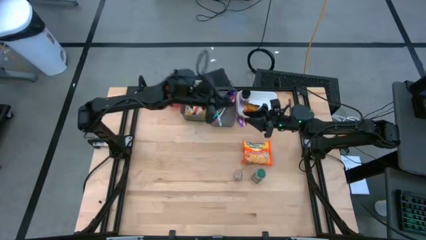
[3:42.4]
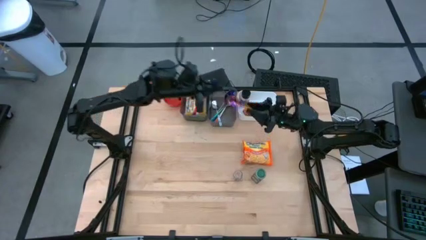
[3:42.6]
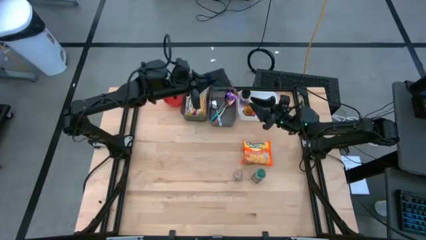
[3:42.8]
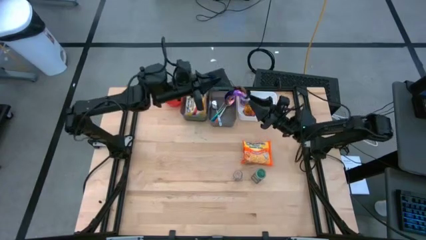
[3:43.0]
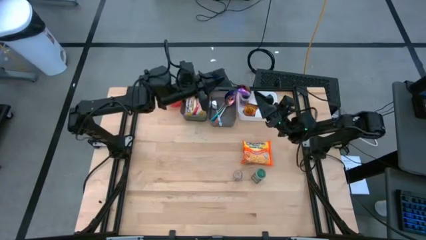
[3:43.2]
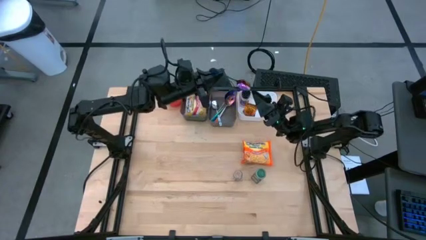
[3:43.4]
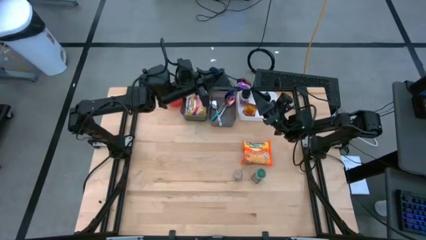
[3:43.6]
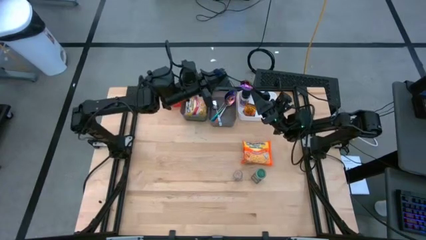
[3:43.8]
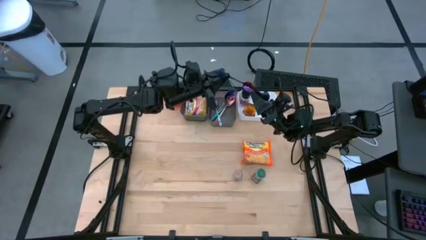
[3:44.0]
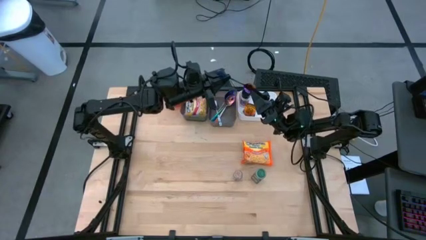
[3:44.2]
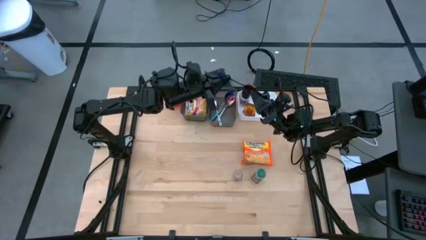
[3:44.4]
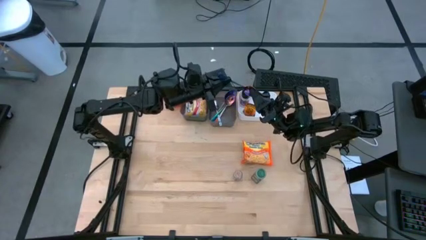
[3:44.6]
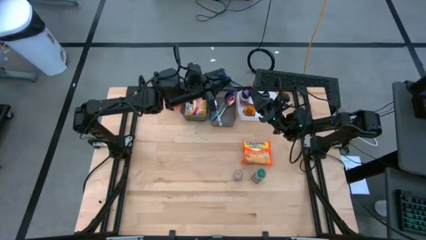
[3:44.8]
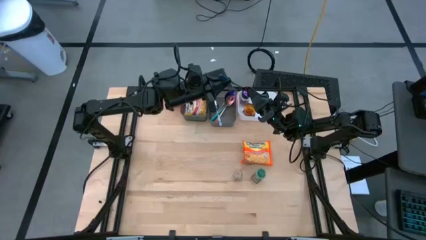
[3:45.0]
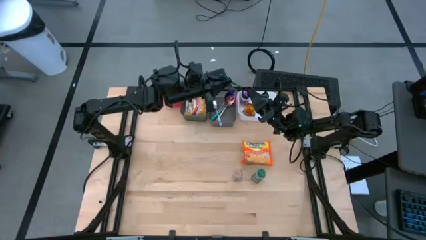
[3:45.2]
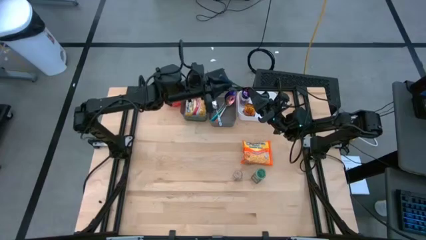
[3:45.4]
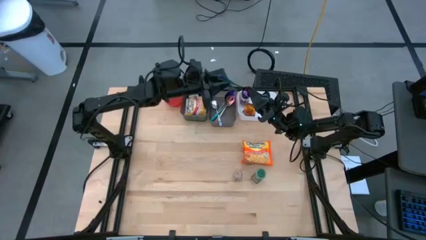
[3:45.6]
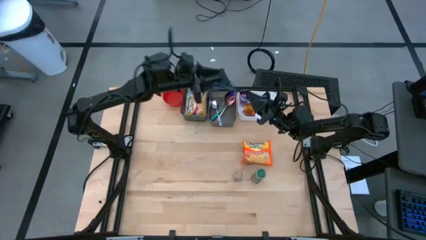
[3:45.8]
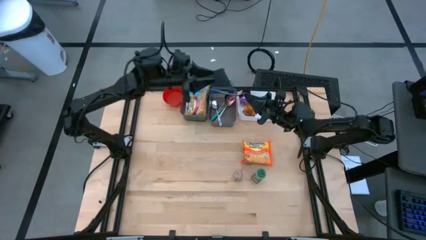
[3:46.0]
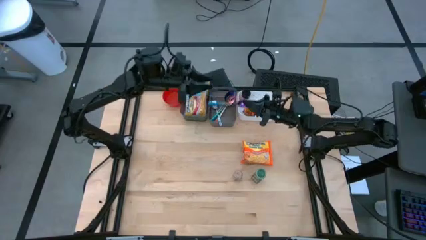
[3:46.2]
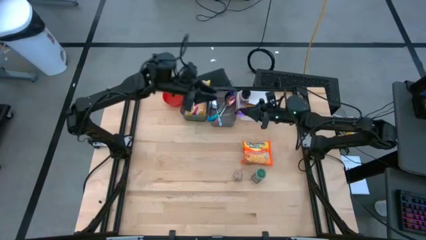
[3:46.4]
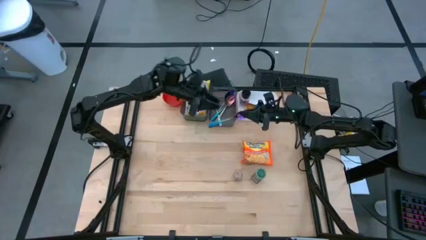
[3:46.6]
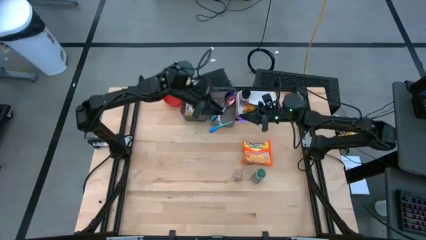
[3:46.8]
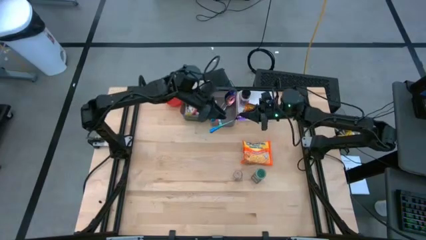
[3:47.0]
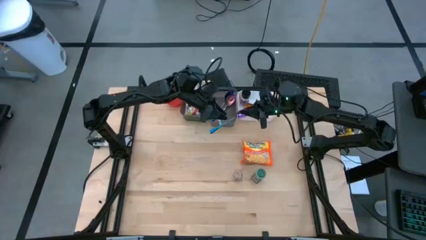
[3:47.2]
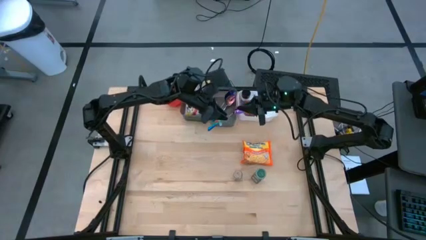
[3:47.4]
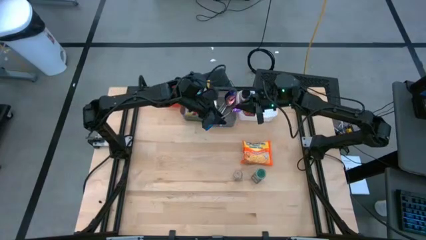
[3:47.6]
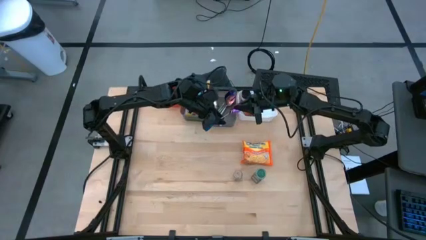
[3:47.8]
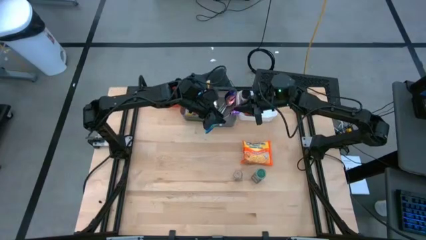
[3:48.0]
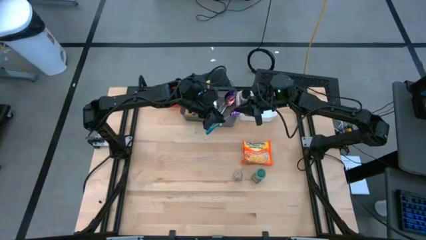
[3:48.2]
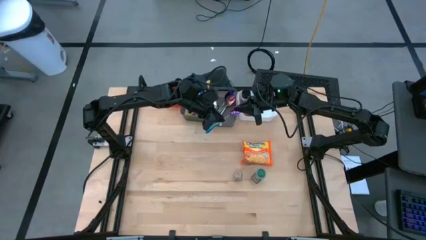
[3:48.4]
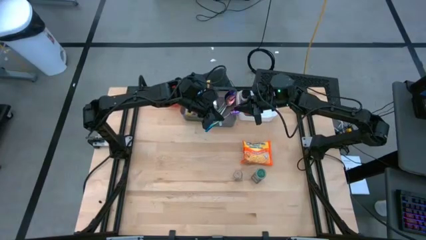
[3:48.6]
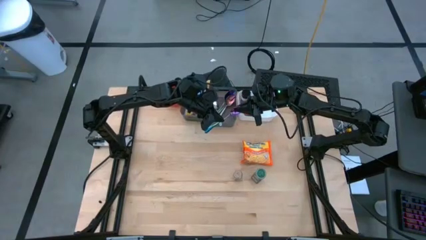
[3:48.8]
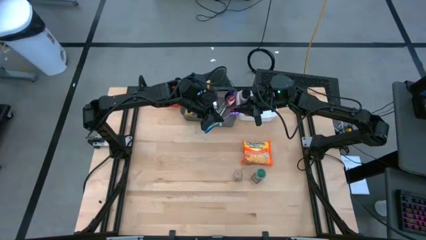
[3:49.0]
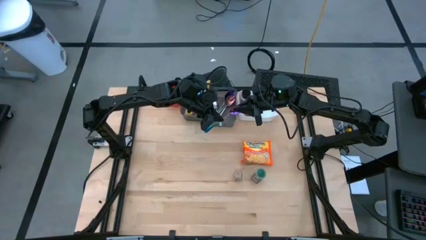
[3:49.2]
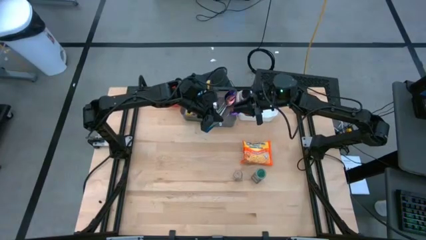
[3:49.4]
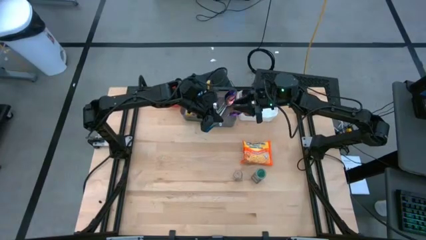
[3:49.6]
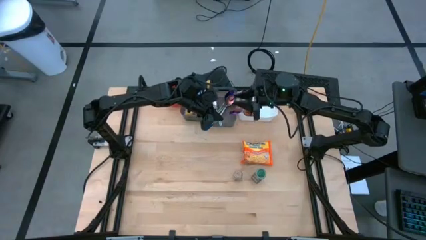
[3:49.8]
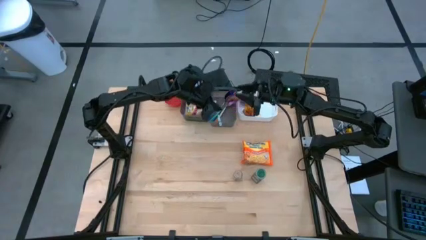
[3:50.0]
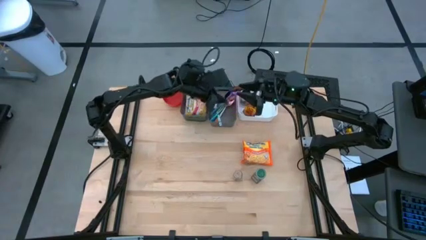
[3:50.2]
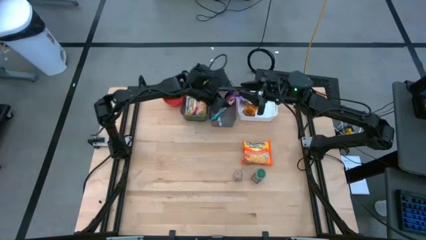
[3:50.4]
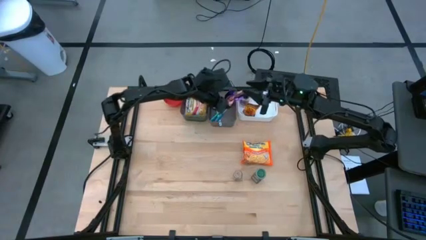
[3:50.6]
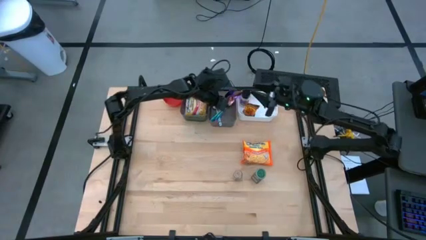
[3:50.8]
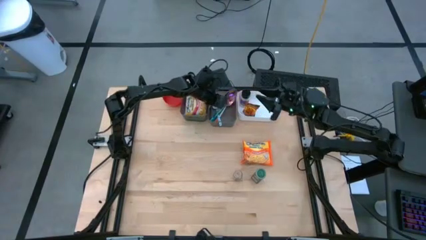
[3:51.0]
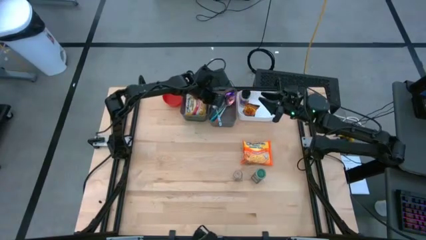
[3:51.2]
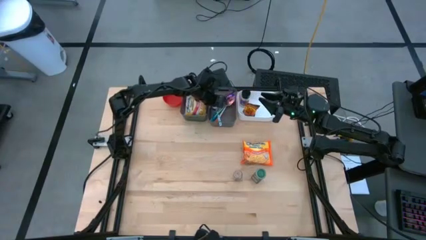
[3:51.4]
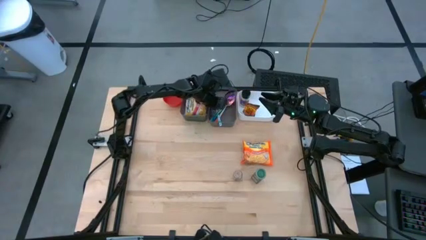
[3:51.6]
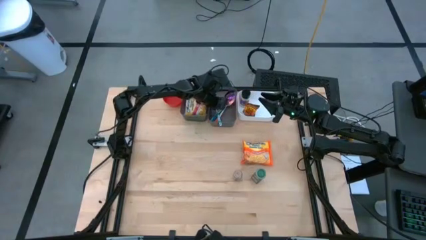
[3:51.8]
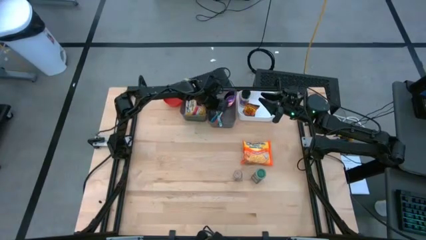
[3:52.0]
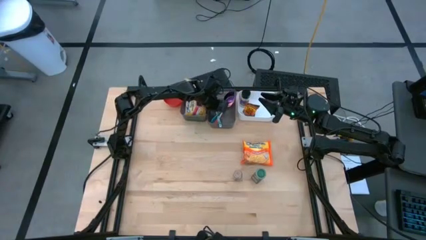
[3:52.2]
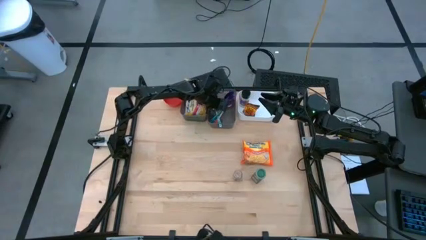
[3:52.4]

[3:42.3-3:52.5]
Task: Pick & Place Food Item
Put the violet spoon into the right black bin

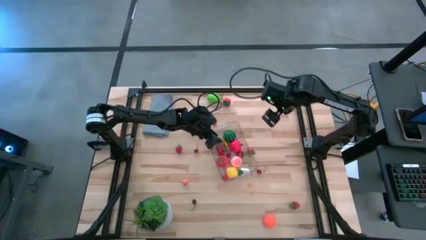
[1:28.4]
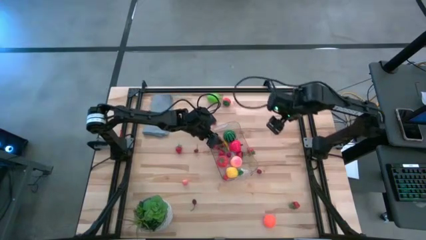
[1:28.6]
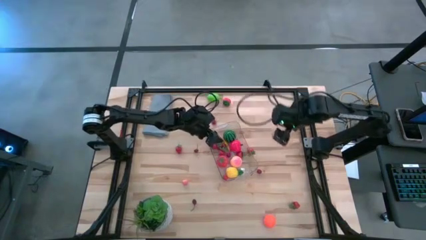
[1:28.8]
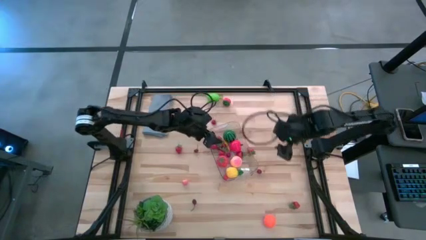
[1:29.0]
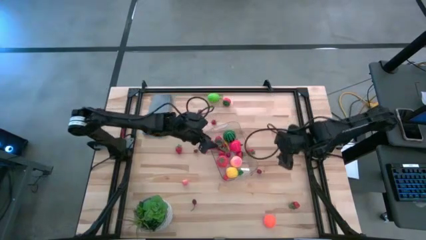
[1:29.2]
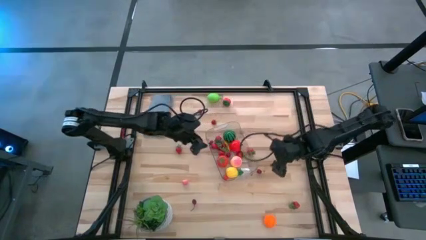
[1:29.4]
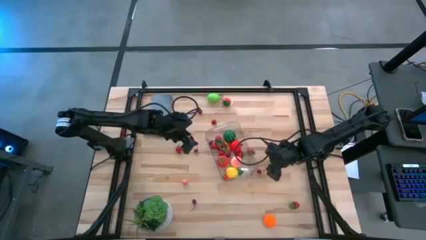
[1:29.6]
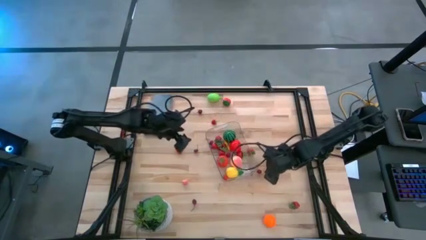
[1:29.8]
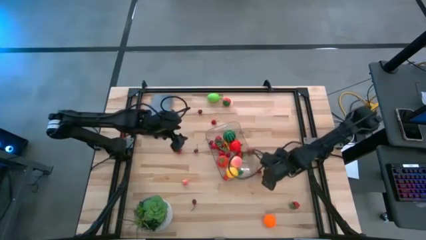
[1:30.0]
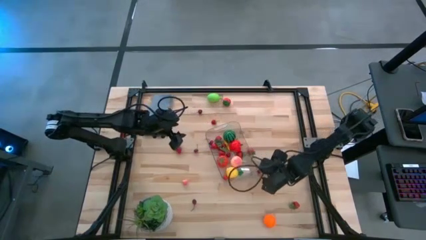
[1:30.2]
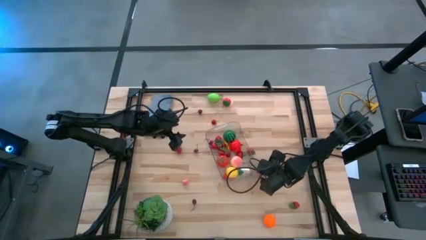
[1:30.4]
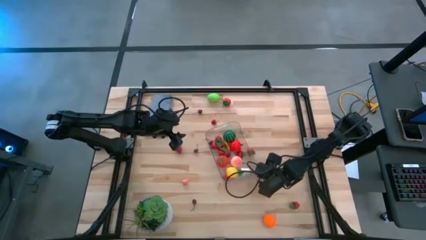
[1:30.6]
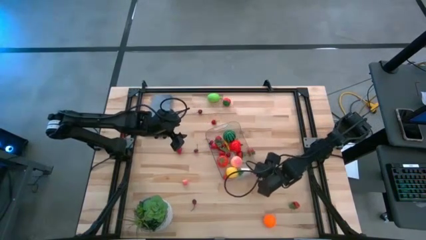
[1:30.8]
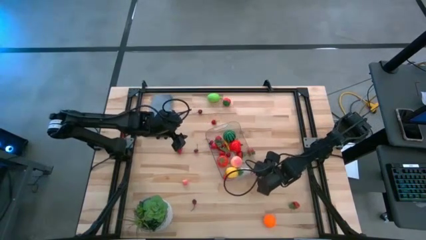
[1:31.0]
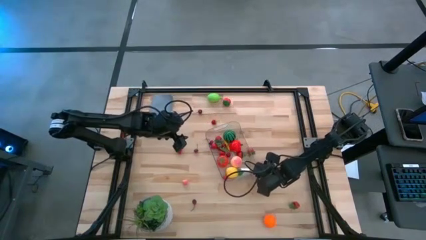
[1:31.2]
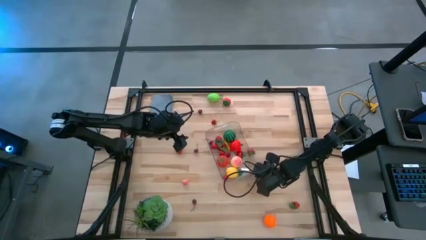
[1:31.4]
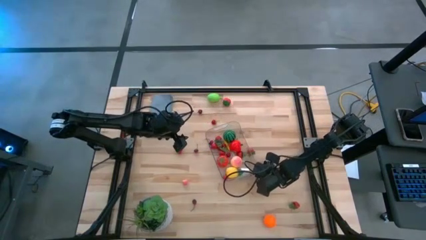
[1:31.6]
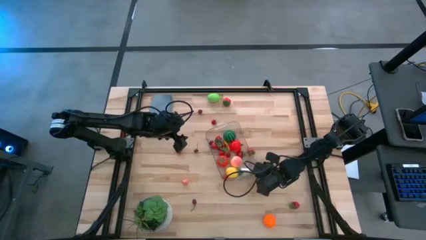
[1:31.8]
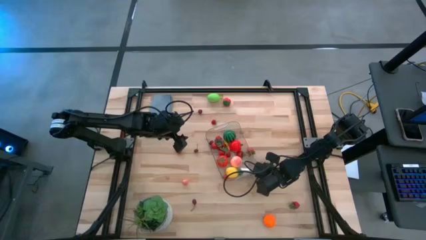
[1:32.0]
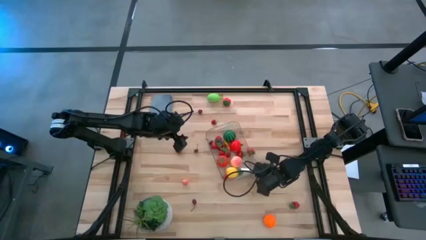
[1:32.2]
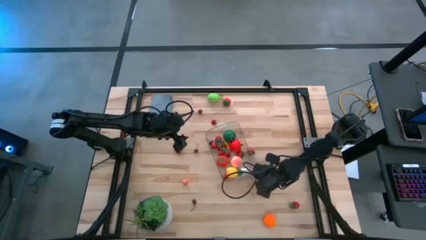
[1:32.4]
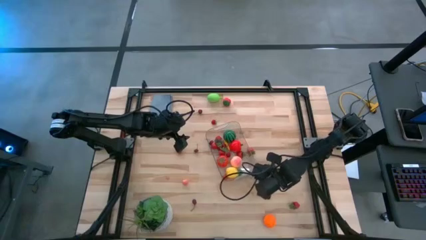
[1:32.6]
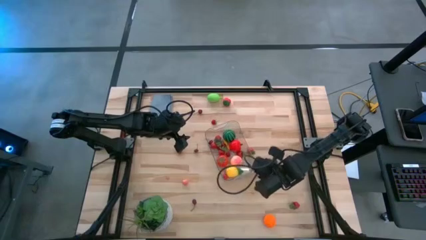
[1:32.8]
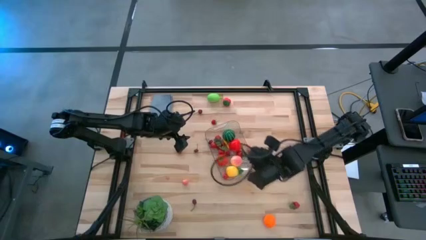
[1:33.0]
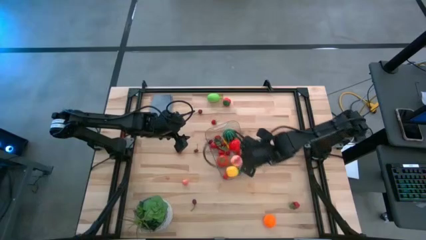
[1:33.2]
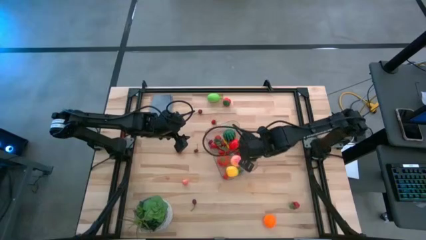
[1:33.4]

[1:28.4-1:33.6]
Task: Pick and placing Produce into tupperware
Put the red cherry into the transparent bin

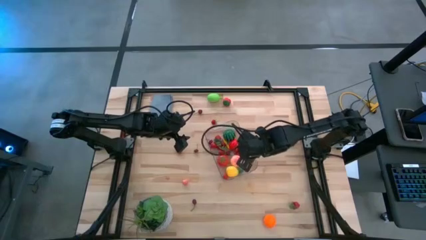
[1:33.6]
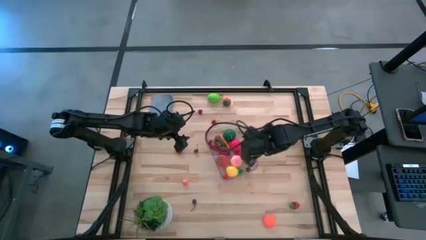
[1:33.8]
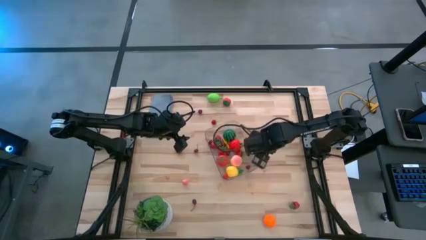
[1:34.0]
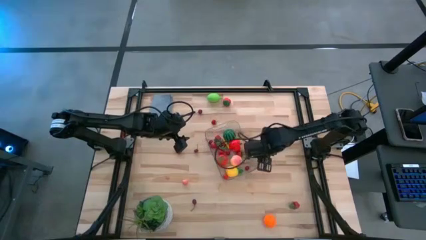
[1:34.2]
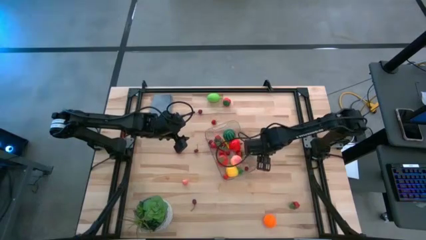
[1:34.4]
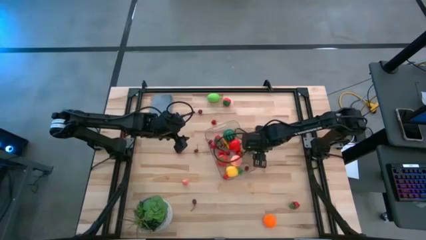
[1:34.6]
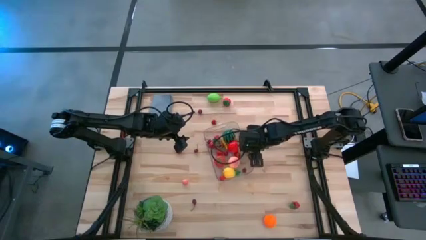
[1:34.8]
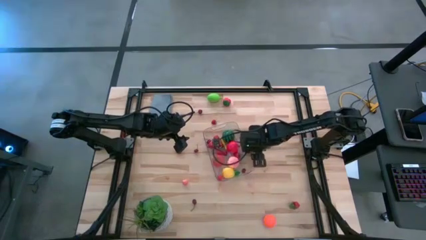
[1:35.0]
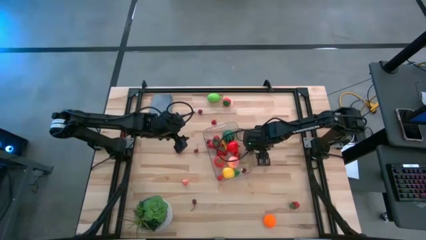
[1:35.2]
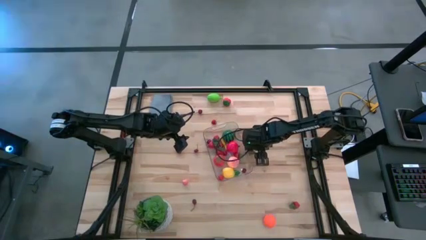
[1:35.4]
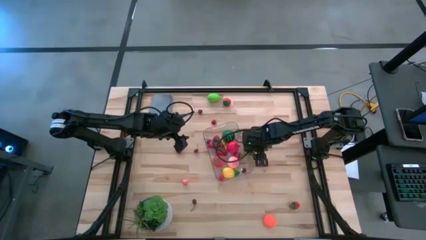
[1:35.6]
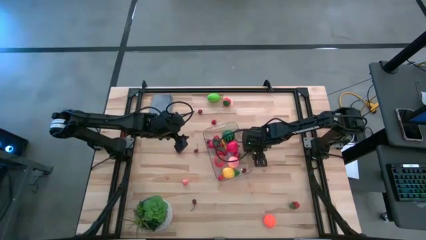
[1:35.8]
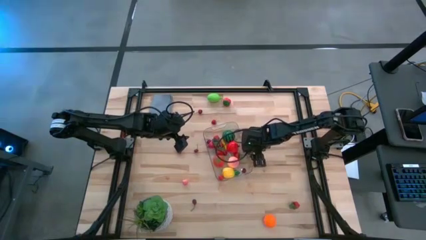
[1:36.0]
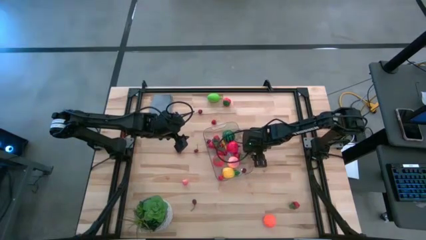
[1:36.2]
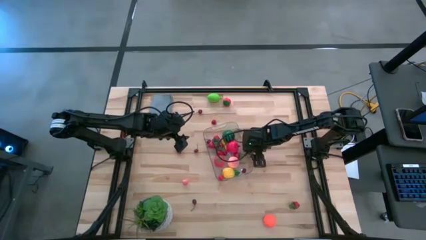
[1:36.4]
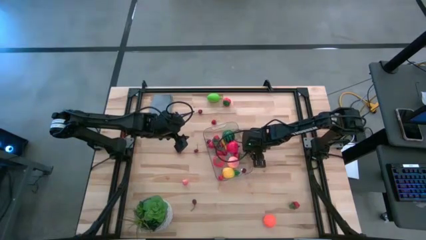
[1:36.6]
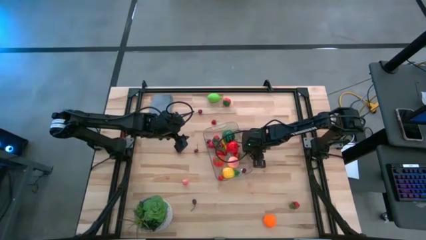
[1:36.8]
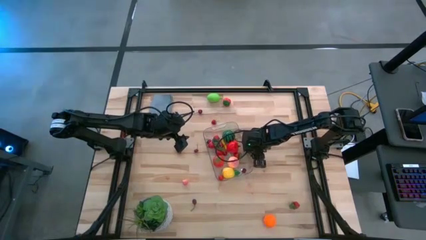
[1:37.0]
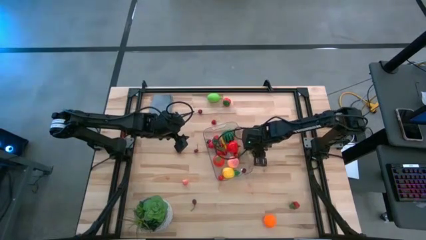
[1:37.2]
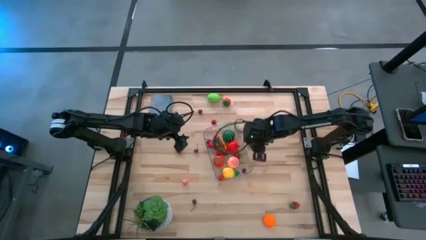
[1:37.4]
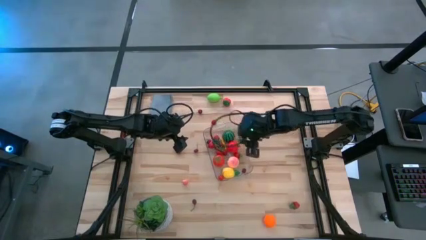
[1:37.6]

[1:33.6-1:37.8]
Put the red strawberry into the transparent bin
